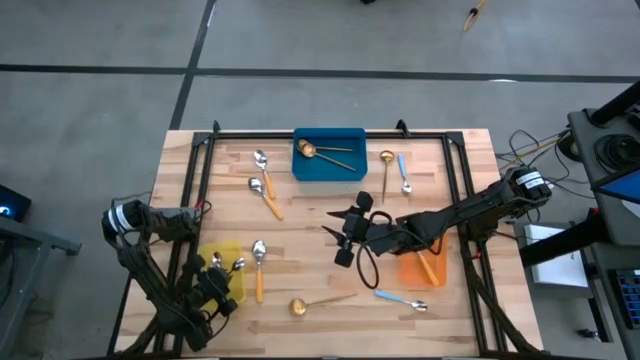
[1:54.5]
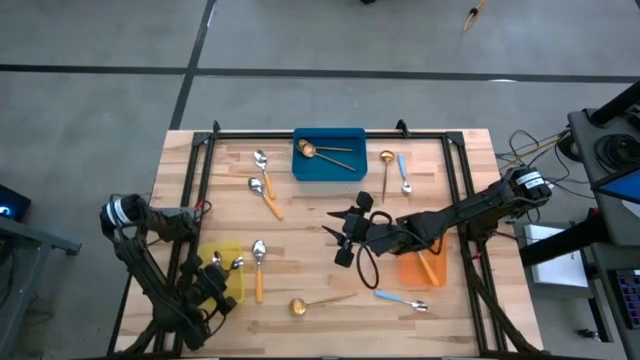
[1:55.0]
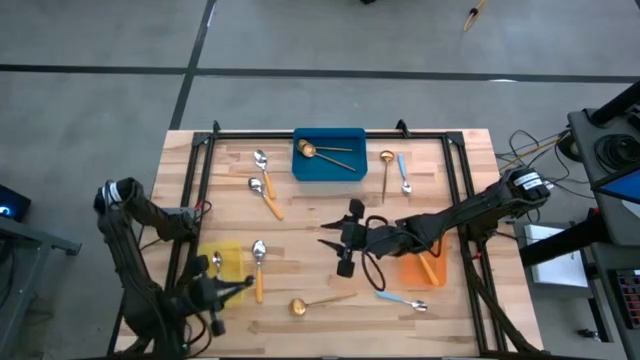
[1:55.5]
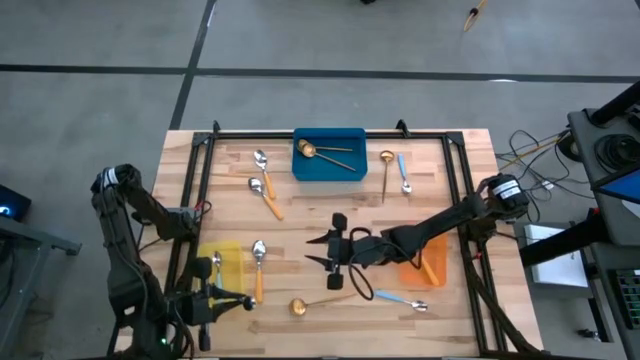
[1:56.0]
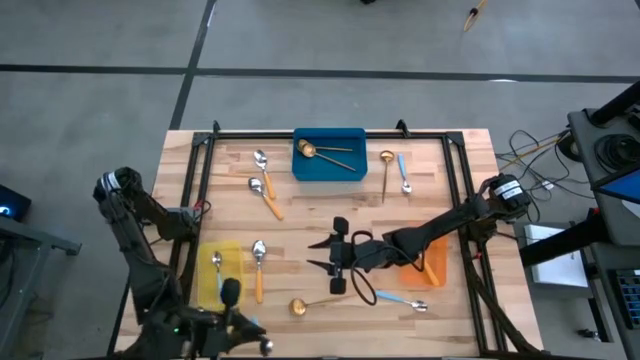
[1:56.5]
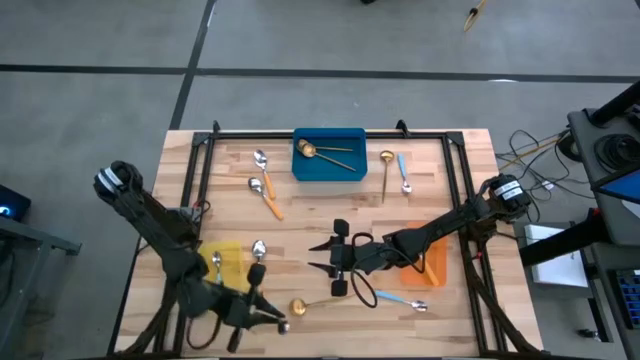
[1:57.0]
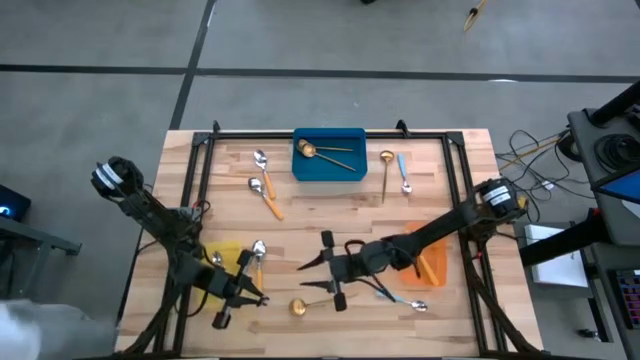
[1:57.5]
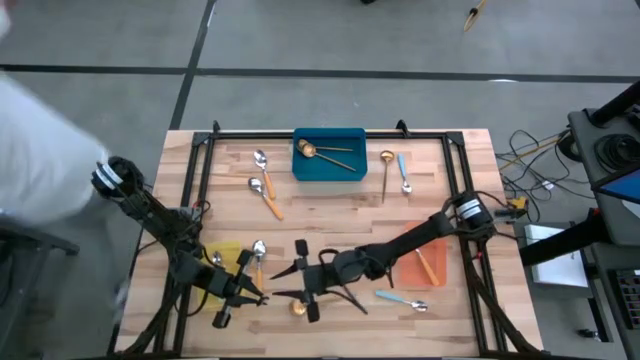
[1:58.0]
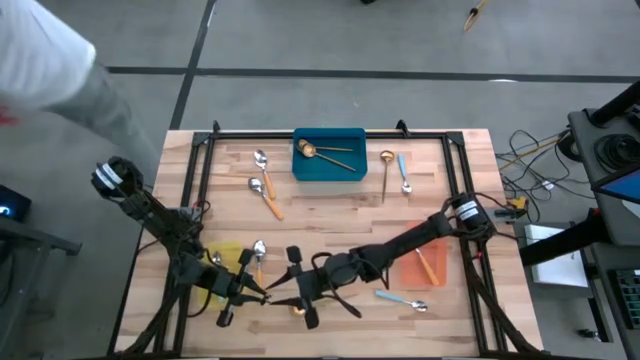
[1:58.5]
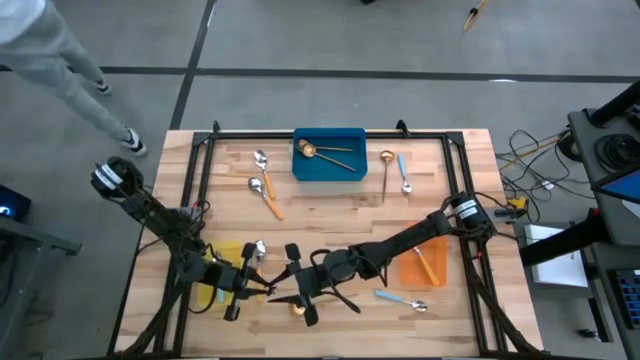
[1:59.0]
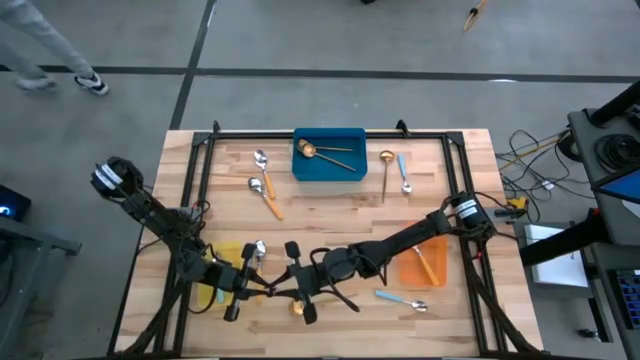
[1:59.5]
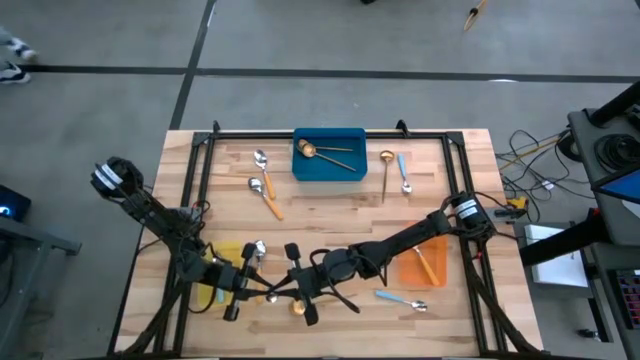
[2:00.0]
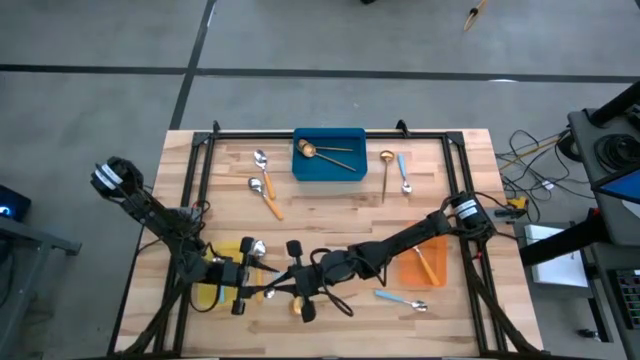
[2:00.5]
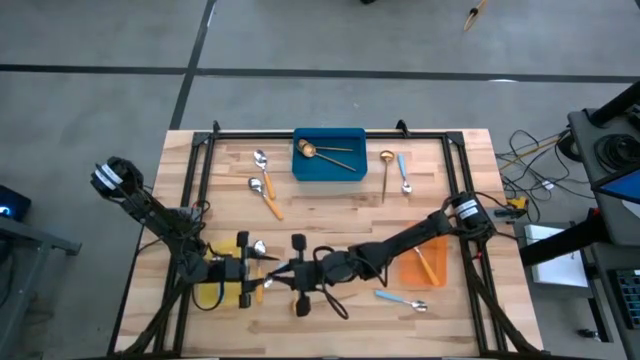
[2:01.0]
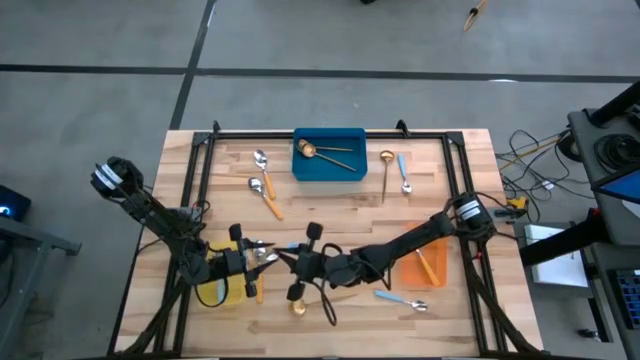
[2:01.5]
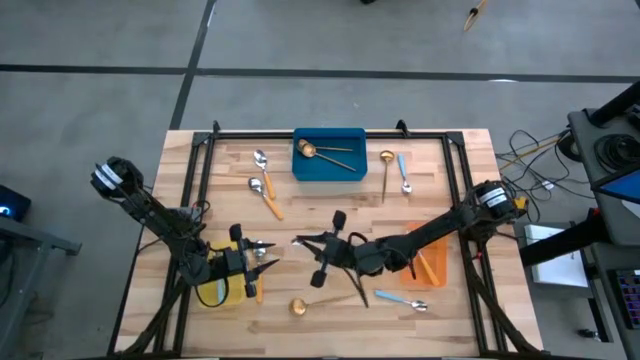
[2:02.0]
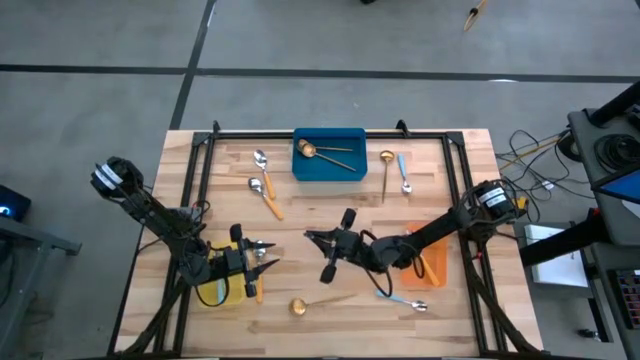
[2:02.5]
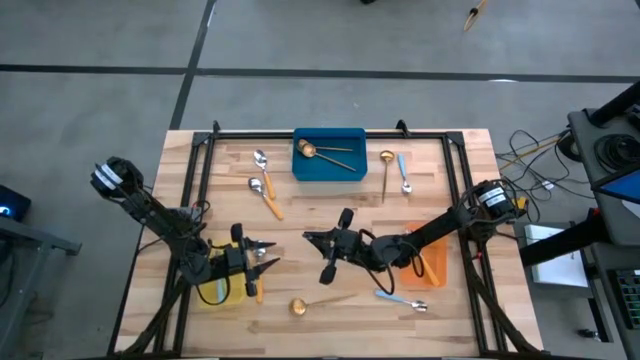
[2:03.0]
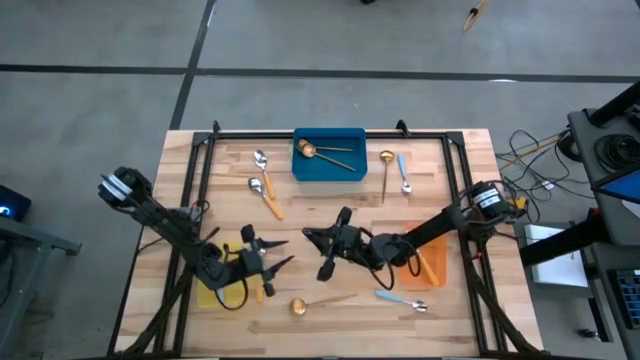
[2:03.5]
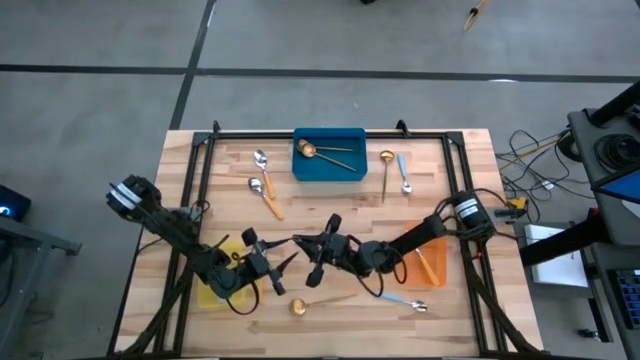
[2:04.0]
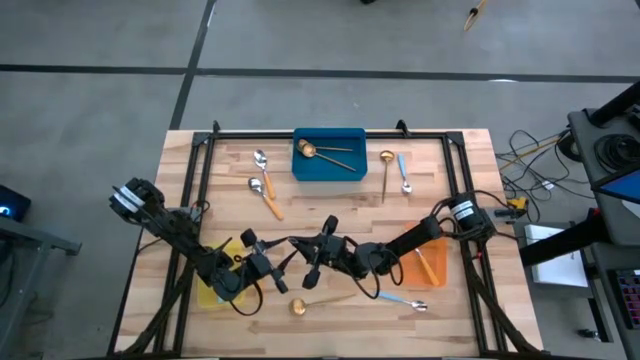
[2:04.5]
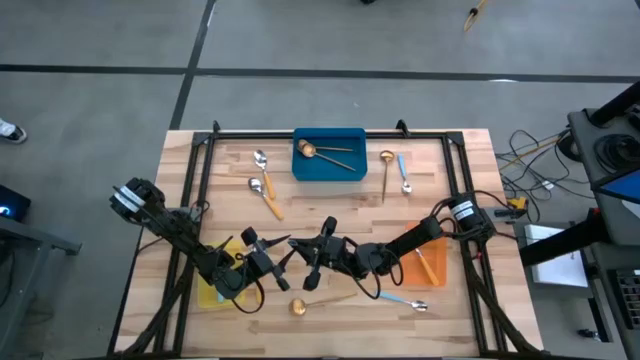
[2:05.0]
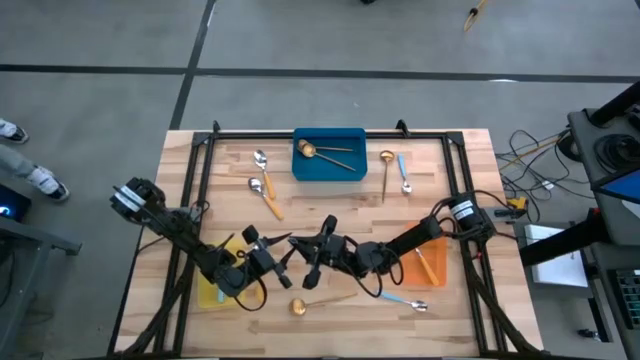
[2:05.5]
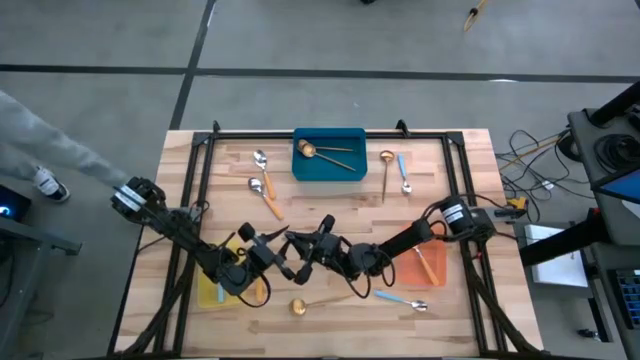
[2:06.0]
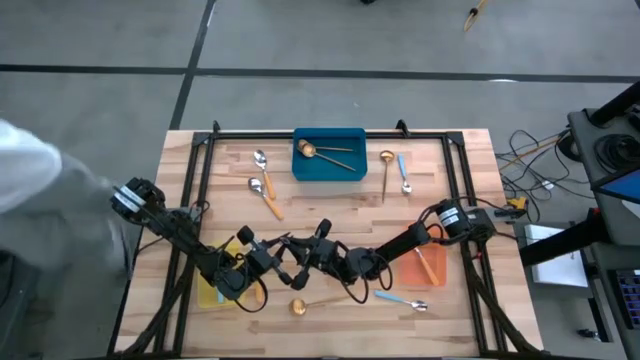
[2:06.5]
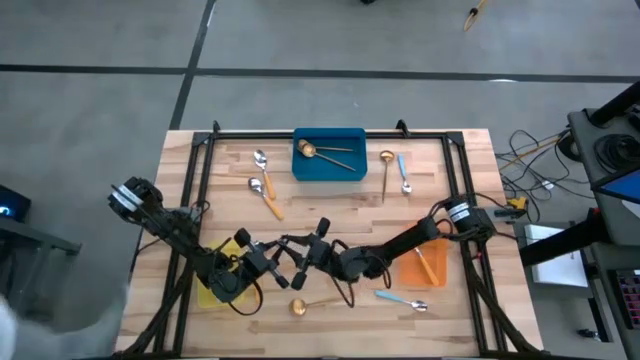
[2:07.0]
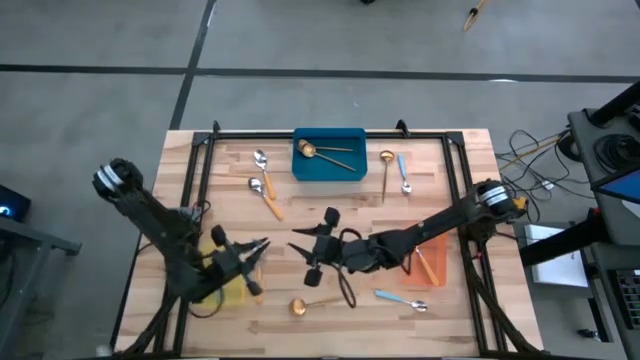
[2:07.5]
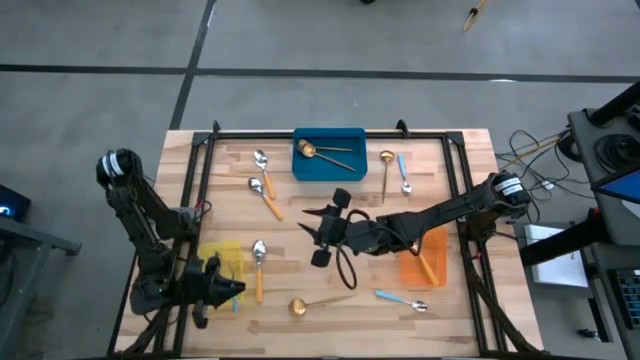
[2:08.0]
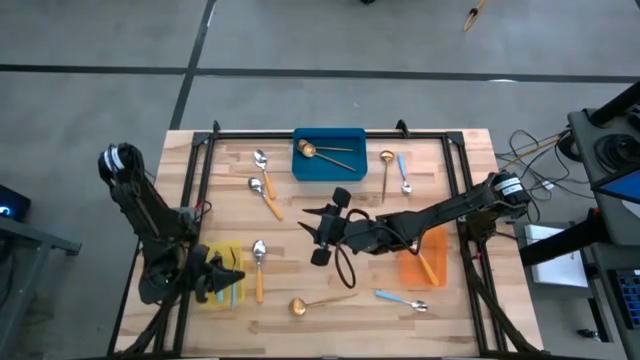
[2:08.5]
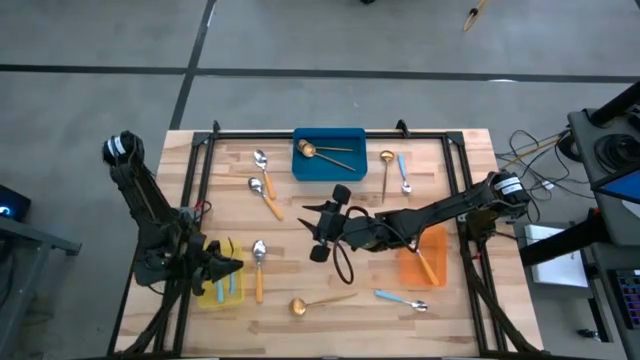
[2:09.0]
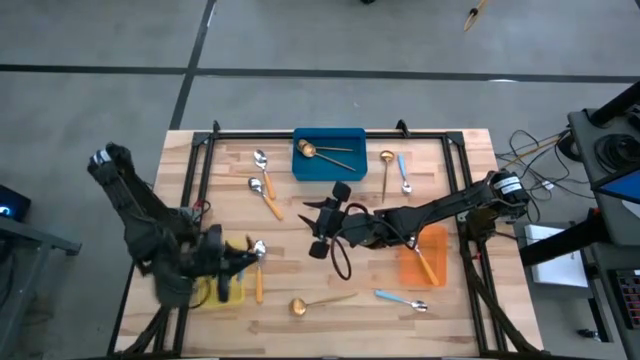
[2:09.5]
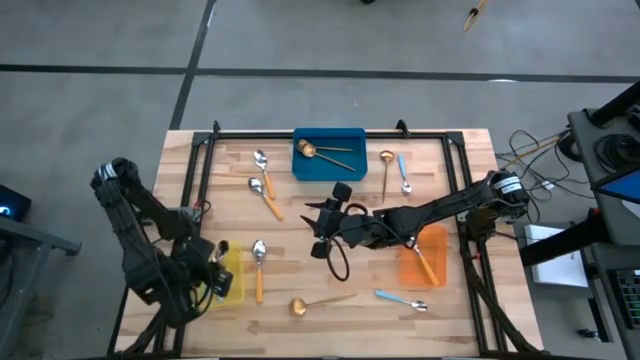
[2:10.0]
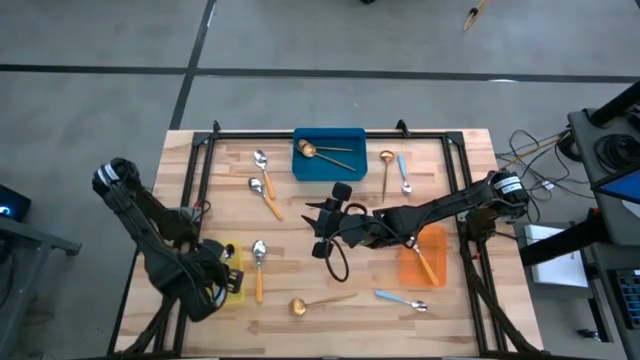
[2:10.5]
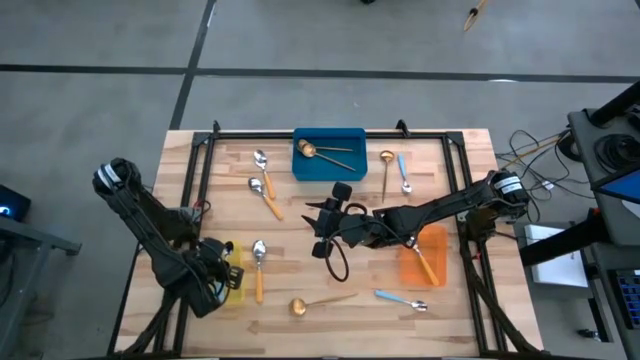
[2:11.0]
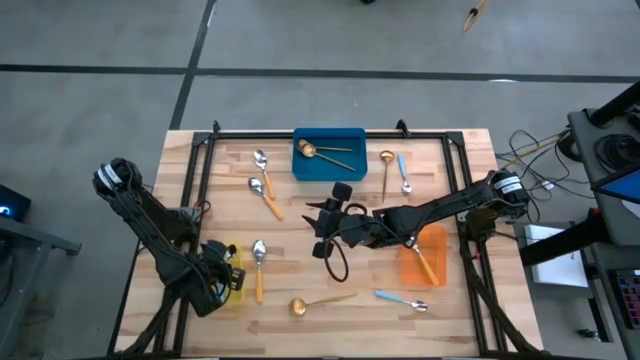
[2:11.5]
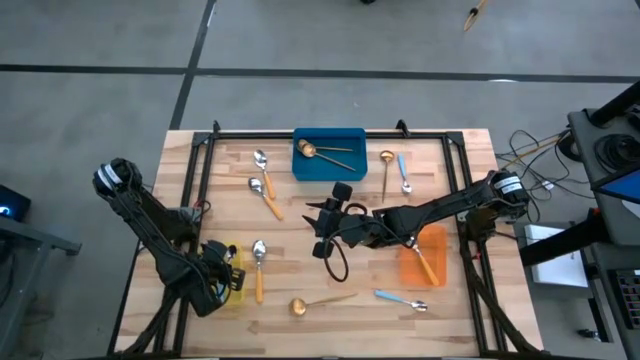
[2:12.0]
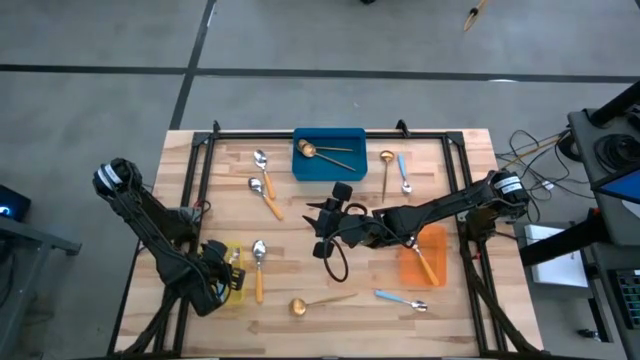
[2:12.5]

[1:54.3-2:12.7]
Task: Sort silverware by color (type)
Put the blue spoon into the yellow bin

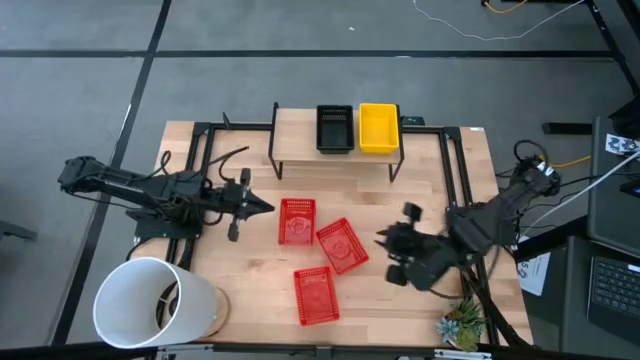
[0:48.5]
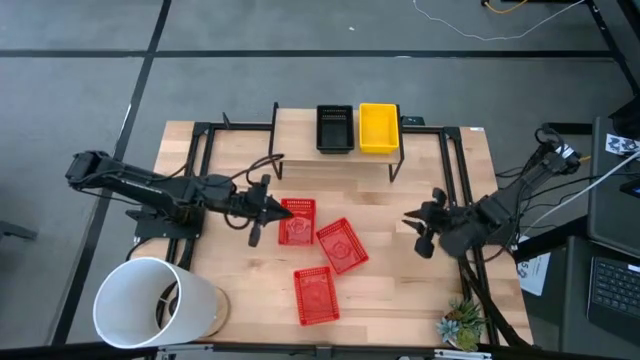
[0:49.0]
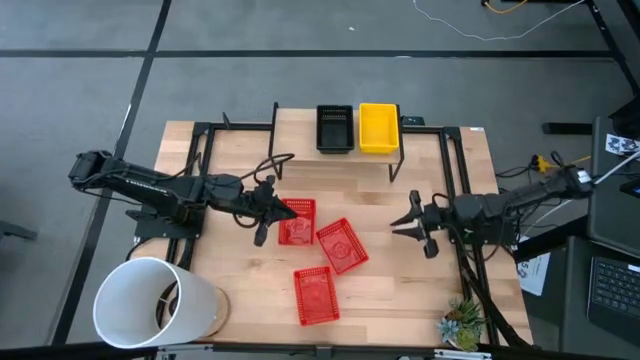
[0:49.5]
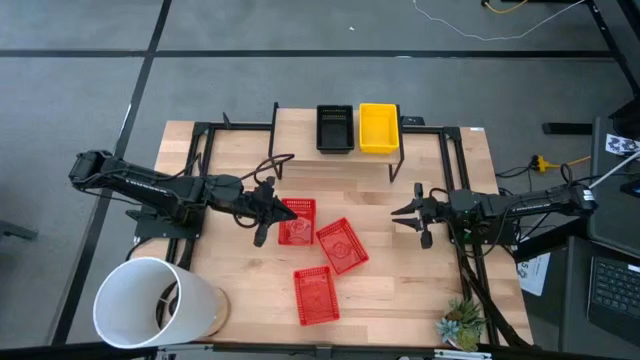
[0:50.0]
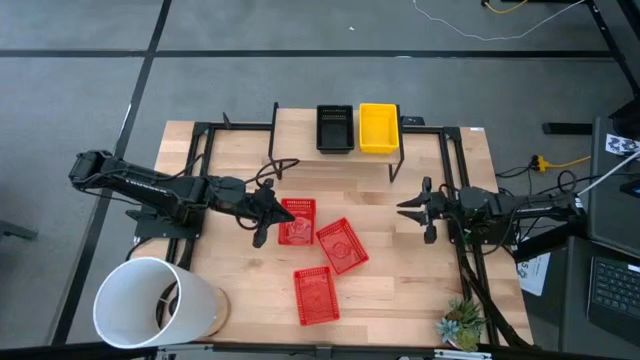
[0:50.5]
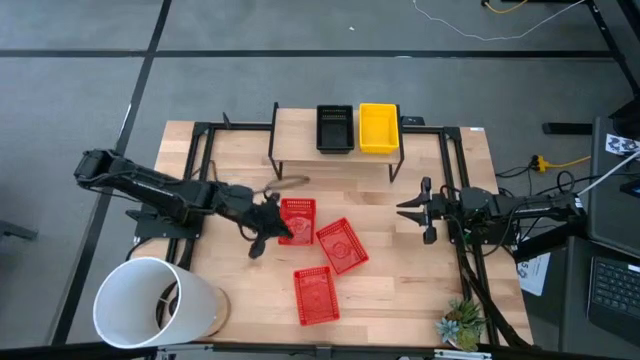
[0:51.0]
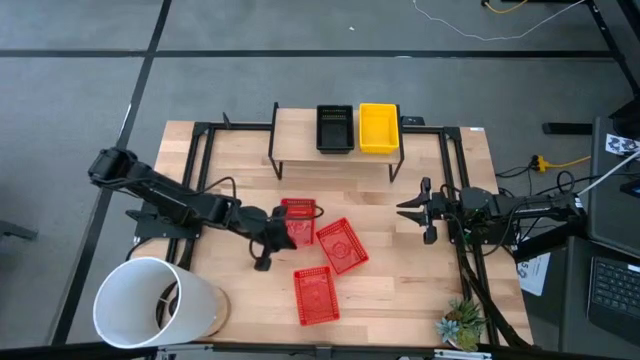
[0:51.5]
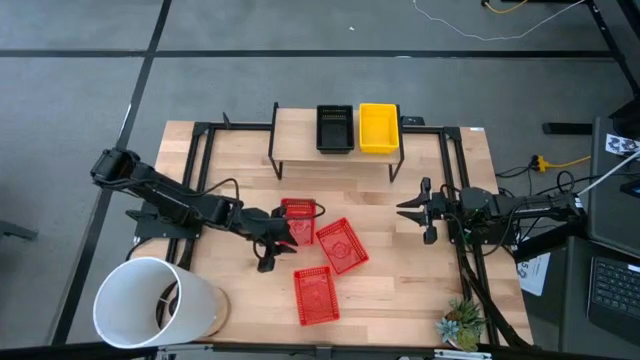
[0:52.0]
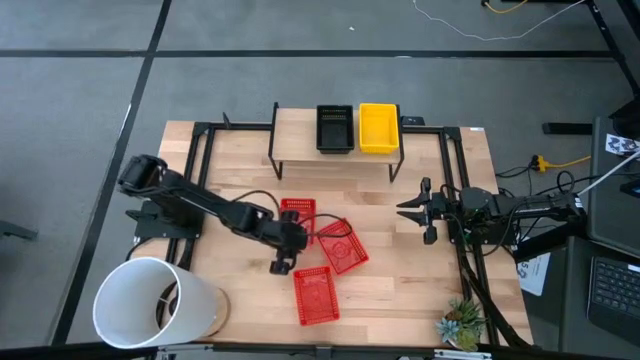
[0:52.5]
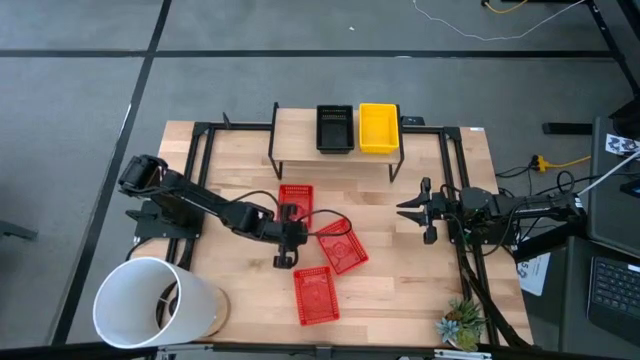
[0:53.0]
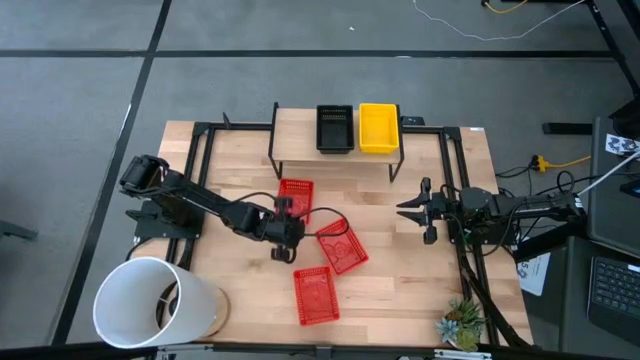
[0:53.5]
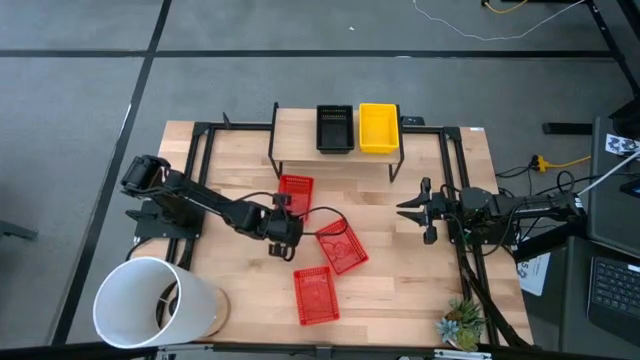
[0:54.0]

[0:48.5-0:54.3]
Task: Stack baskets on shelf by color
Put the top red basket on the shelf
